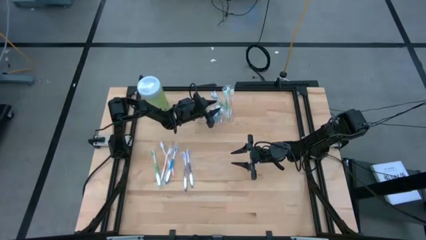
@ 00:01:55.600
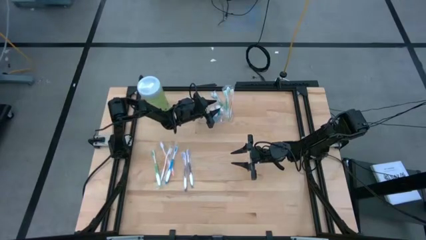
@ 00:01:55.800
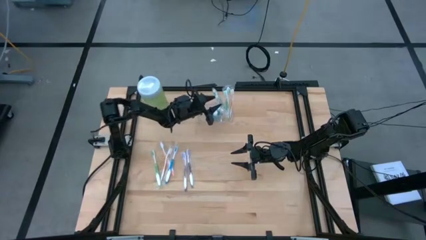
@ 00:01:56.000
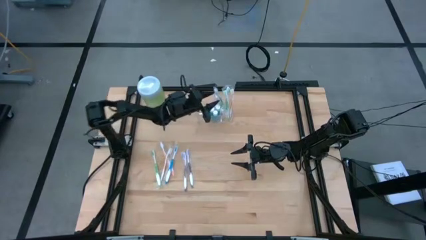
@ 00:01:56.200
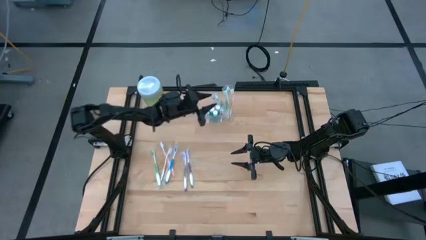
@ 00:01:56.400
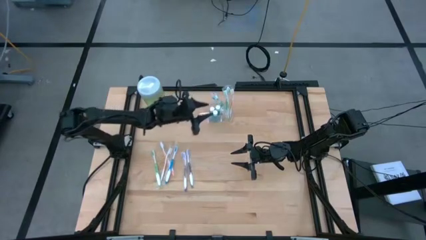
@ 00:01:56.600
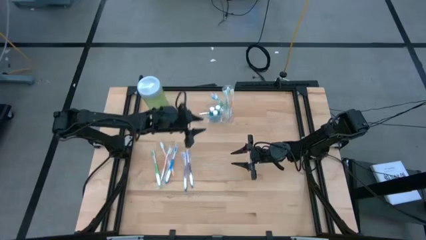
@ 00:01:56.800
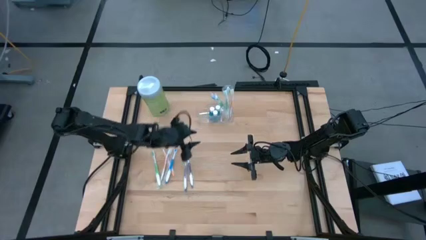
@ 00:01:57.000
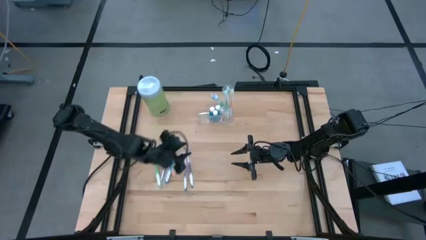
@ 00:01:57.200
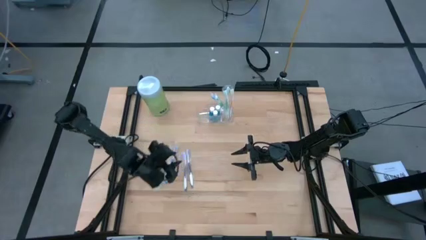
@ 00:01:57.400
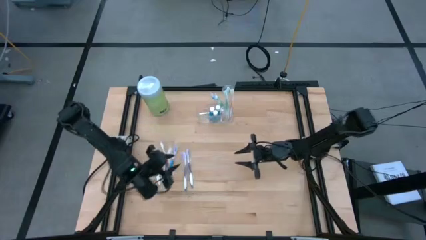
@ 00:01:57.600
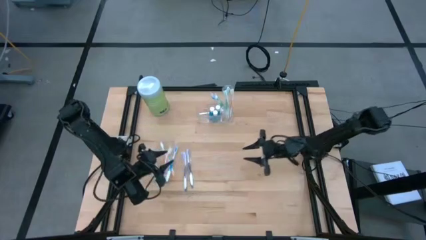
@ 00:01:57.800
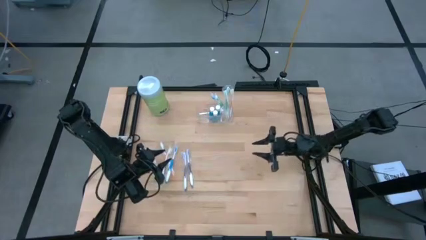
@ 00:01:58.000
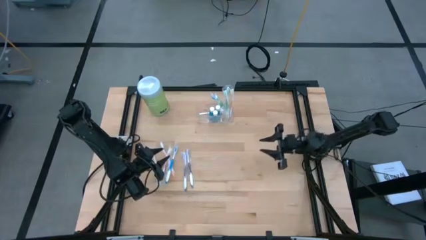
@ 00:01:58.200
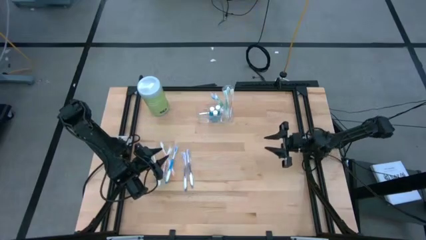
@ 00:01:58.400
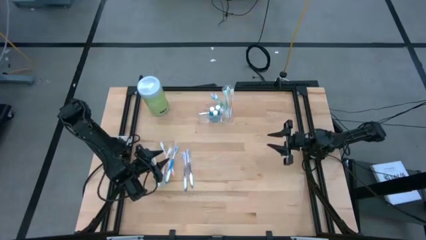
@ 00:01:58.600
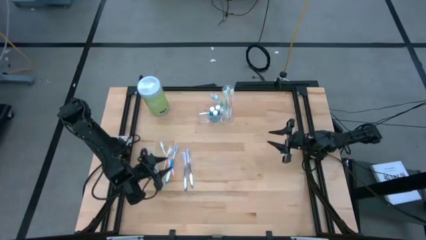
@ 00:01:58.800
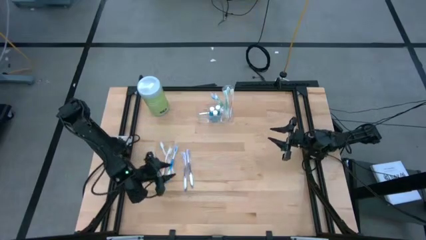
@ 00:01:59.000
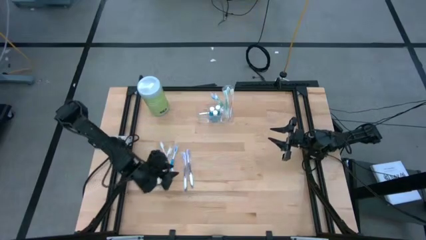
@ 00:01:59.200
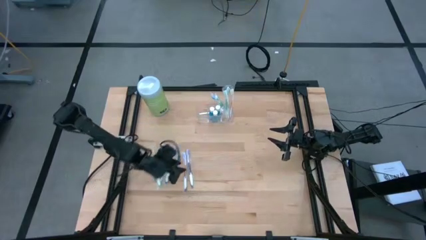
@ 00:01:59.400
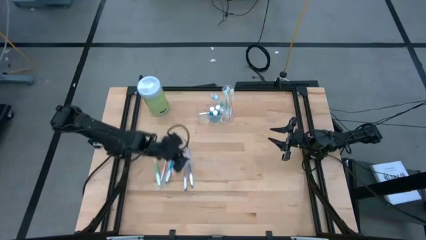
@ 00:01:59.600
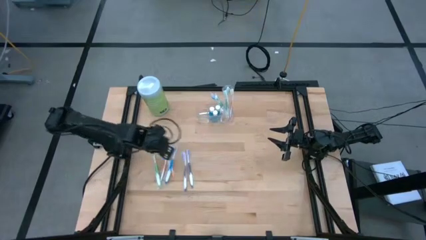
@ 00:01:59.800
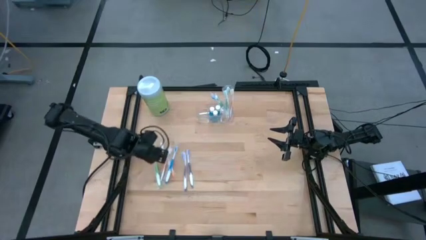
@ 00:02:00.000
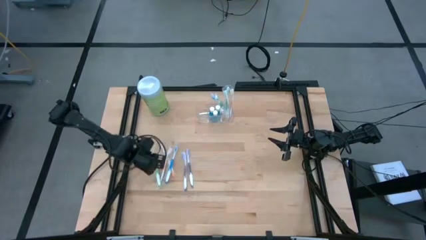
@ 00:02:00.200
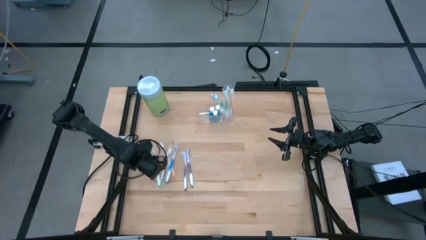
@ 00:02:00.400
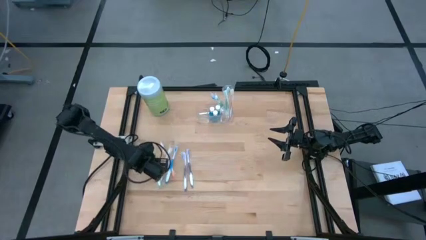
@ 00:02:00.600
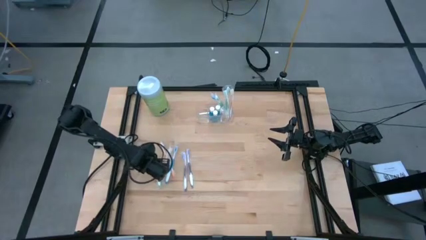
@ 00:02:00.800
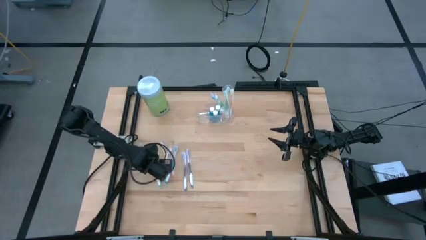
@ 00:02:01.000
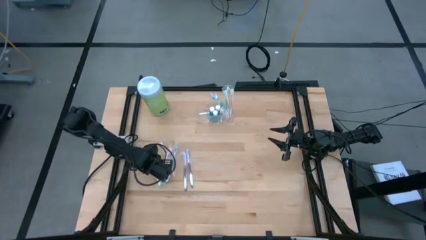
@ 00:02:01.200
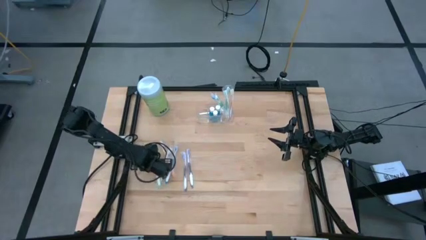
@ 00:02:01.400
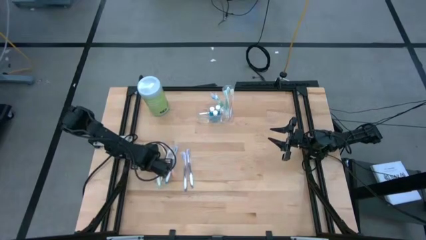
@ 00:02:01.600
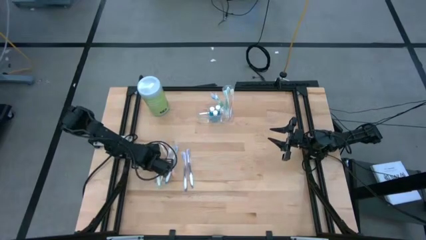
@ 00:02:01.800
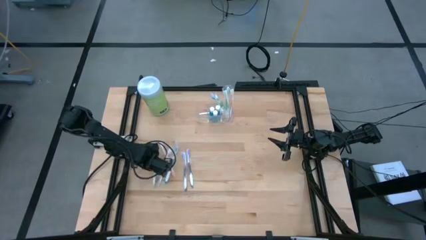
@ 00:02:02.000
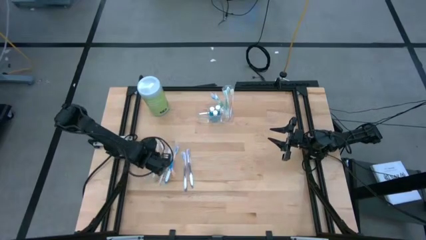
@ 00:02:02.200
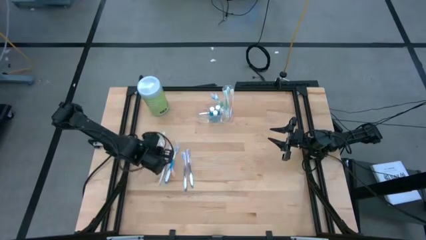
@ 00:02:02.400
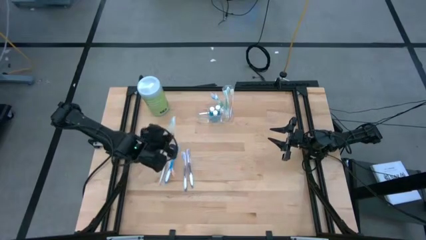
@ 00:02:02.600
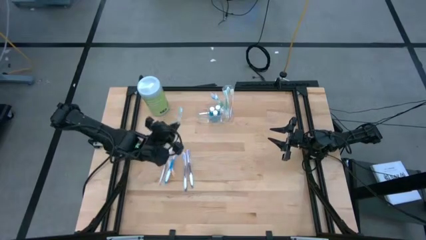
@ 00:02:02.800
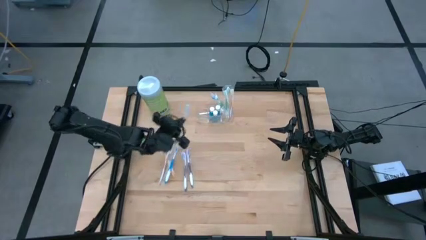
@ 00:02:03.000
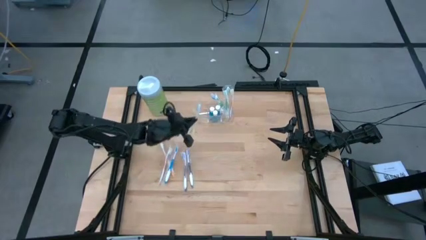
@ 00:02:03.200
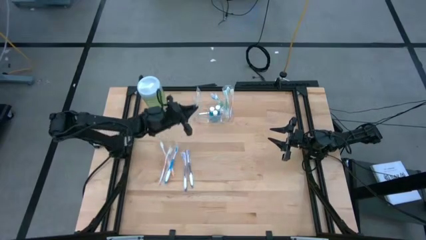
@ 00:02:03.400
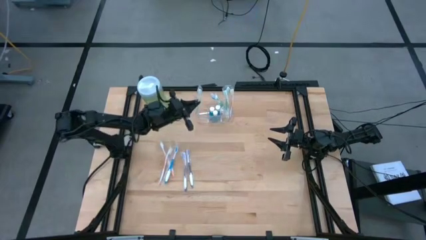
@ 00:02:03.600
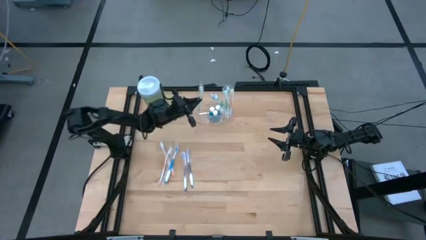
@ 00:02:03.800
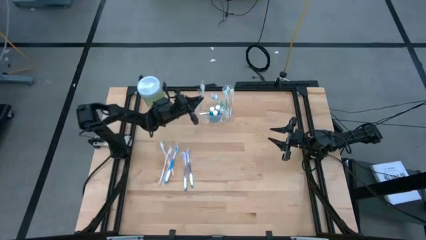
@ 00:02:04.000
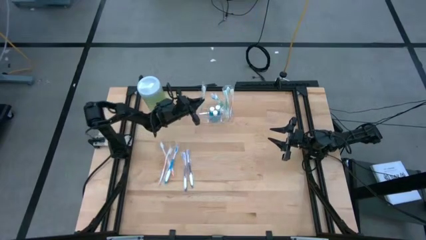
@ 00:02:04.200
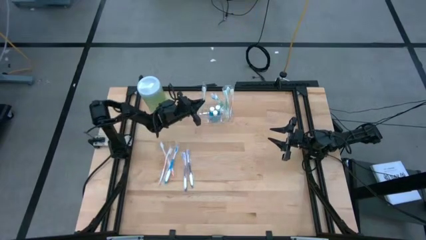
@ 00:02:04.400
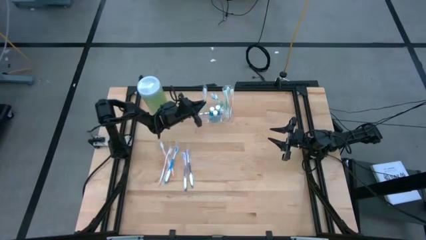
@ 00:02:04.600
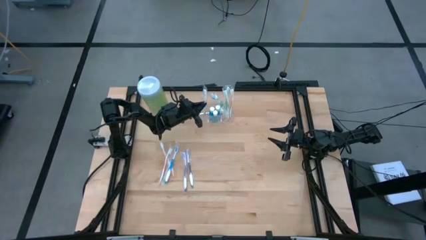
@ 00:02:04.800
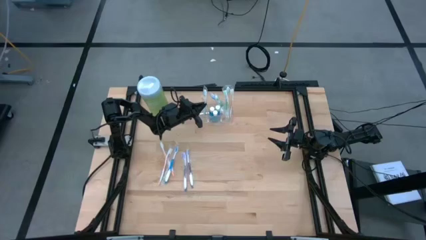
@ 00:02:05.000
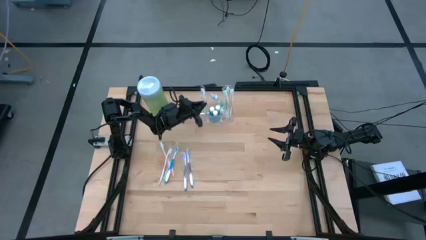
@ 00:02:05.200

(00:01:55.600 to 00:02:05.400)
Task: Pick & Place toothbrushing station
Put the green toothbrush into the transparent organizer

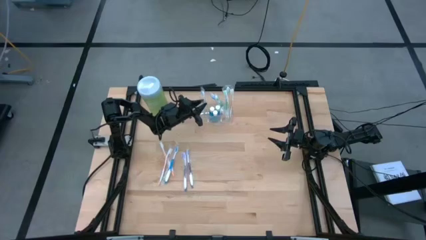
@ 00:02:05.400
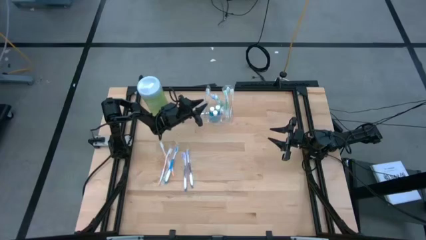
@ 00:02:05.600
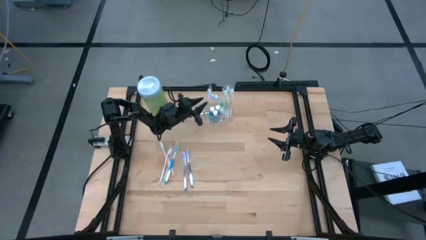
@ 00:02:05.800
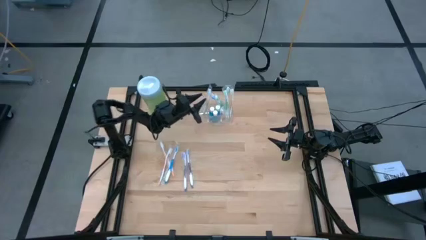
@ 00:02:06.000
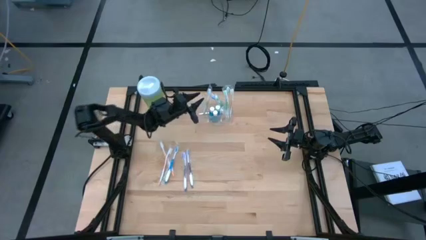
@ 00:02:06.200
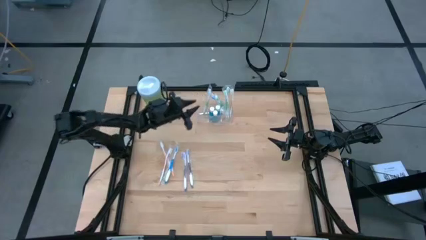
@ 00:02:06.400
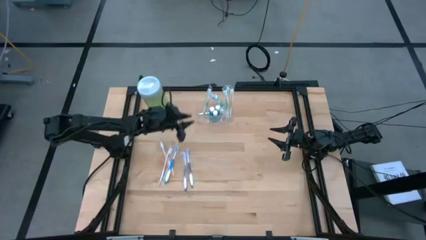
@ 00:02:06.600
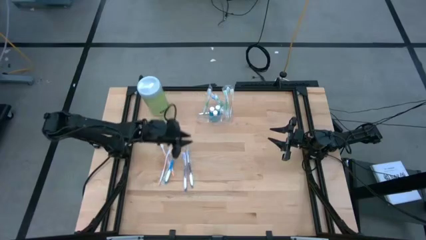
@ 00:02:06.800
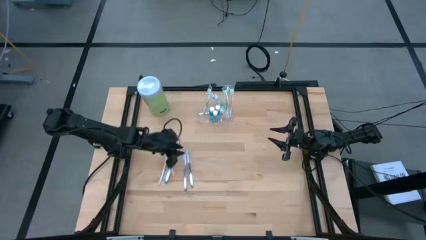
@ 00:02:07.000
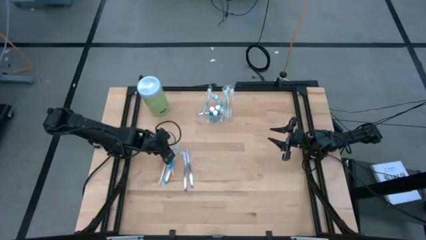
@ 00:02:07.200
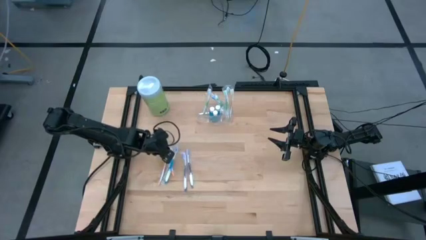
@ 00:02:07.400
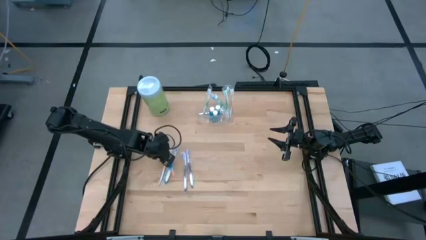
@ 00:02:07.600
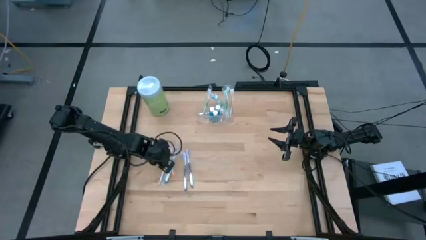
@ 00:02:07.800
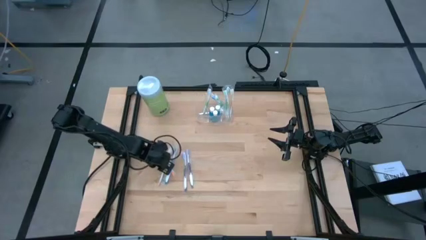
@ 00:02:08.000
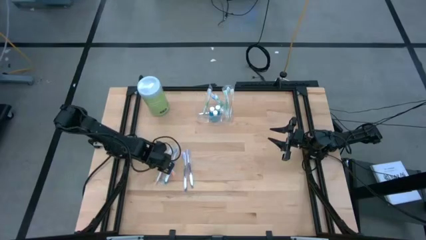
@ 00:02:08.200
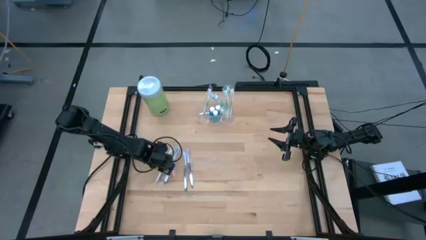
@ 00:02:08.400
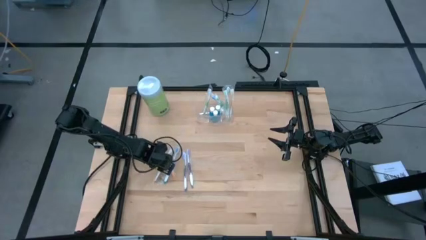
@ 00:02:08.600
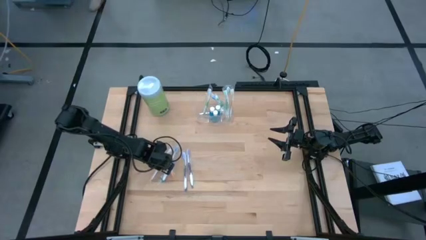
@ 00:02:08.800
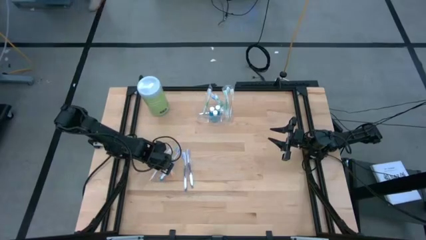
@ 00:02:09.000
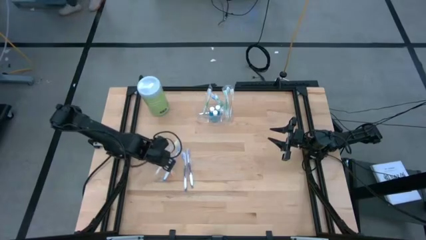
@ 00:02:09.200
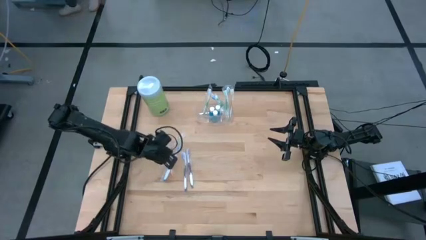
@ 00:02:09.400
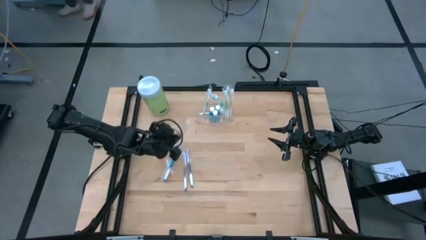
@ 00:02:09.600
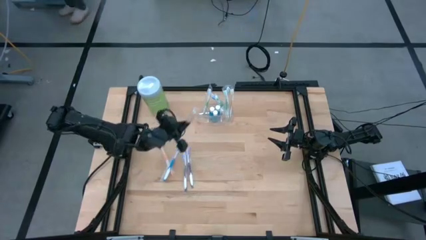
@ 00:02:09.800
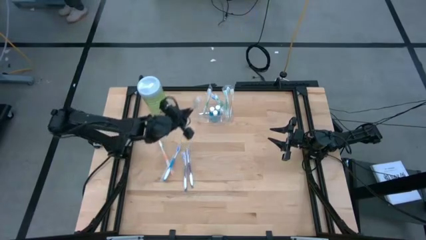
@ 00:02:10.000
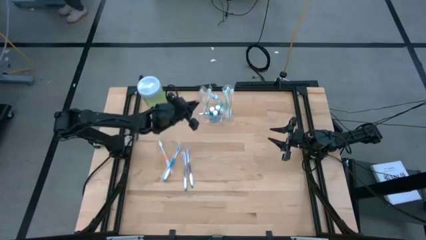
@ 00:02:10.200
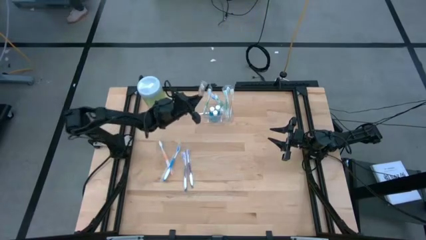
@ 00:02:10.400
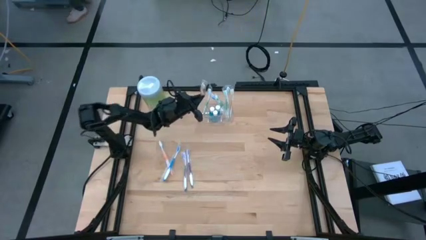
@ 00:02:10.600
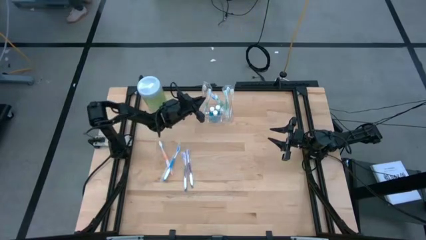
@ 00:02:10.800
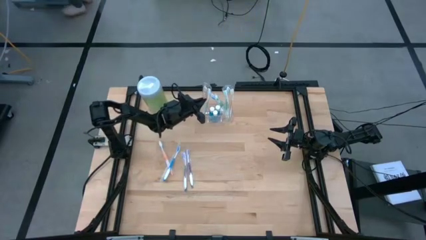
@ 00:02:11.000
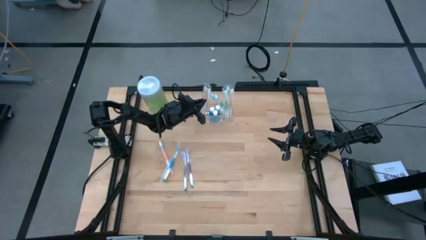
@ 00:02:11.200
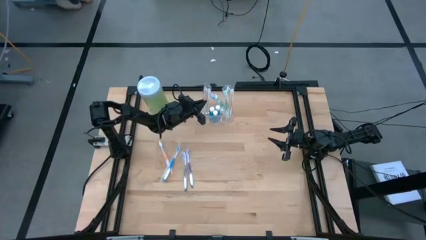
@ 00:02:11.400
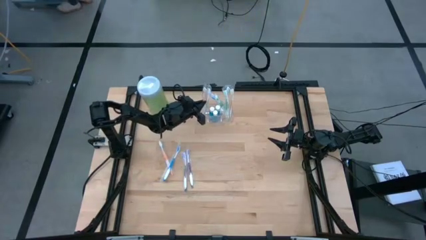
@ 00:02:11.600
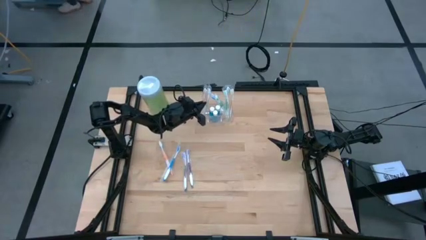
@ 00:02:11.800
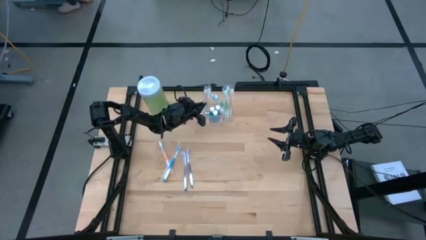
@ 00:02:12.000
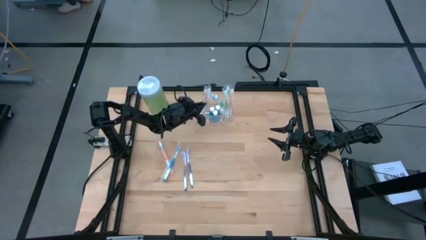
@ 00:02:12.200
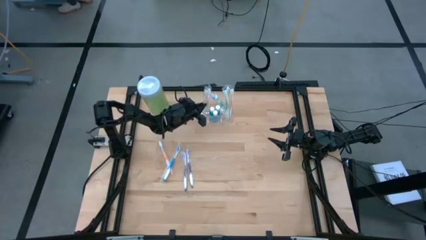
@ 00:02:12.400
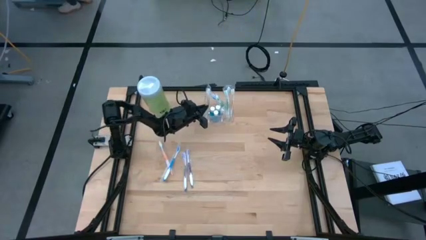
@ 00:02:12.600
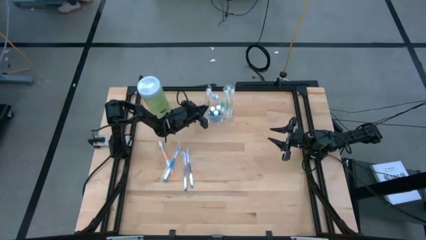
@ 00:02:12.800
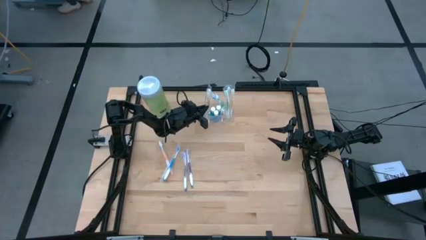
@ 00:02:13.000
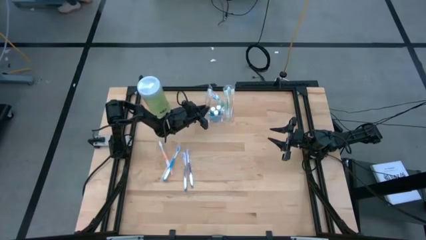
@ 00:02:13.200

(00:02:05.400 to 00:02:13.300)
Put the orange toothbrush into the transparent organizer
